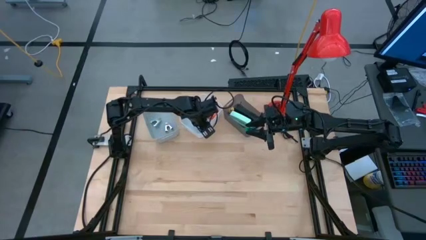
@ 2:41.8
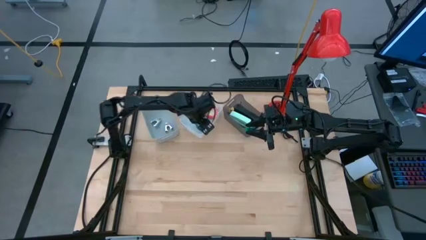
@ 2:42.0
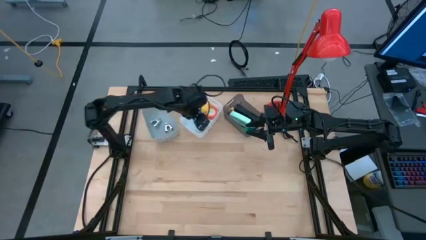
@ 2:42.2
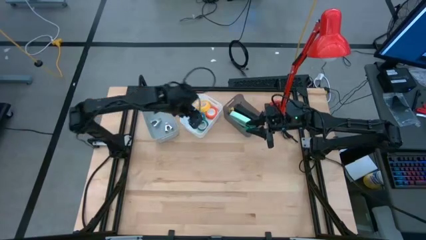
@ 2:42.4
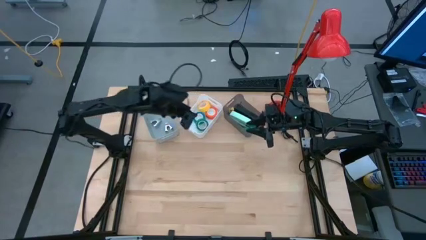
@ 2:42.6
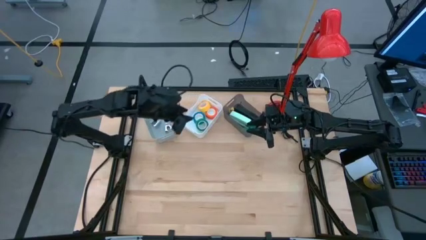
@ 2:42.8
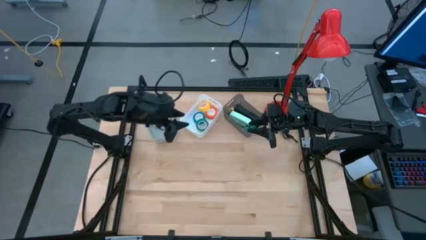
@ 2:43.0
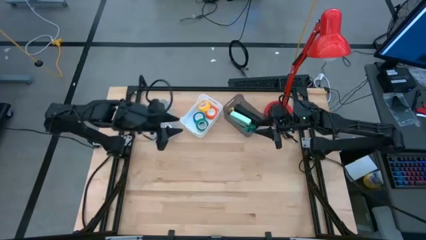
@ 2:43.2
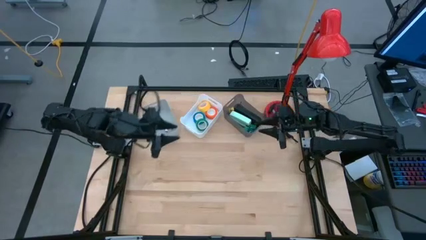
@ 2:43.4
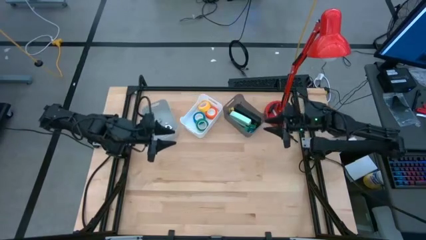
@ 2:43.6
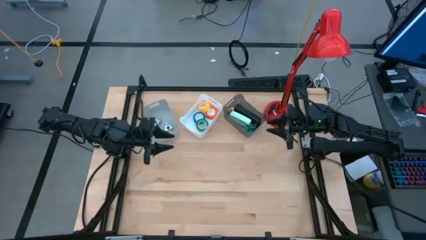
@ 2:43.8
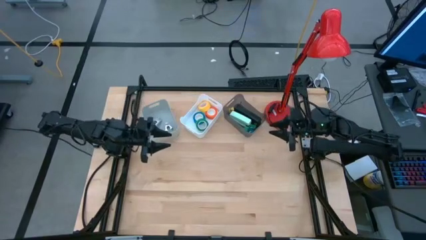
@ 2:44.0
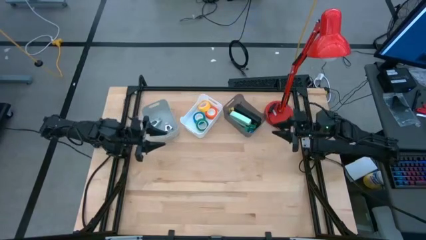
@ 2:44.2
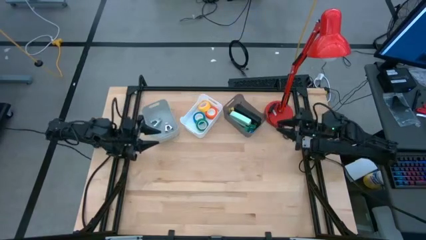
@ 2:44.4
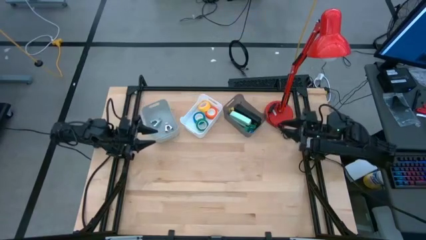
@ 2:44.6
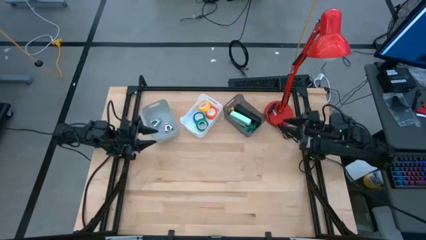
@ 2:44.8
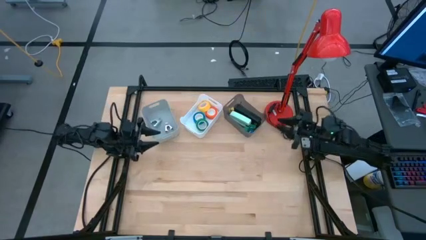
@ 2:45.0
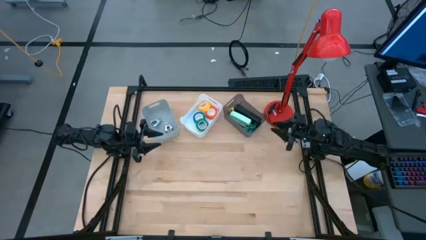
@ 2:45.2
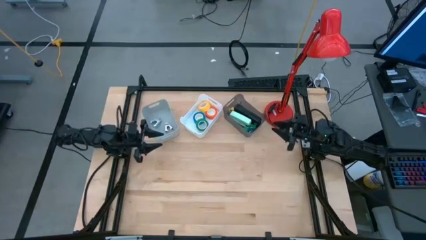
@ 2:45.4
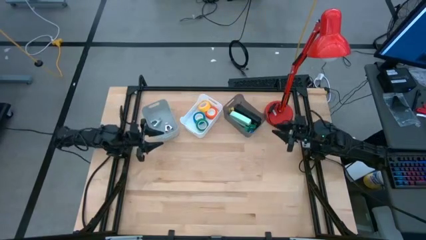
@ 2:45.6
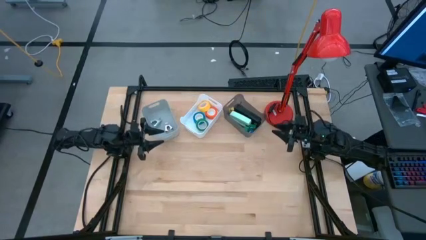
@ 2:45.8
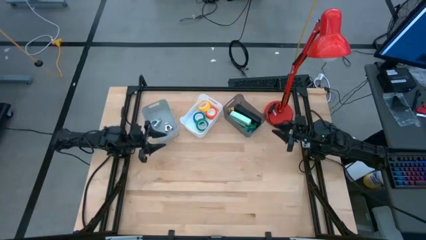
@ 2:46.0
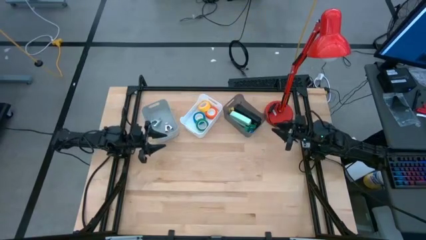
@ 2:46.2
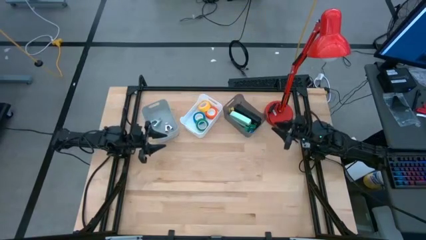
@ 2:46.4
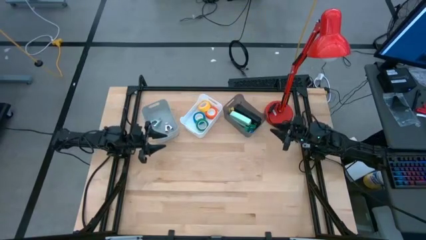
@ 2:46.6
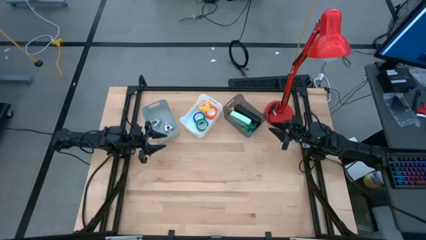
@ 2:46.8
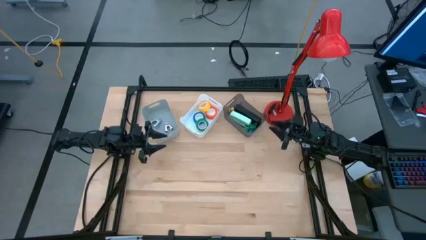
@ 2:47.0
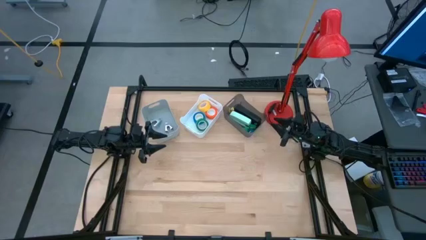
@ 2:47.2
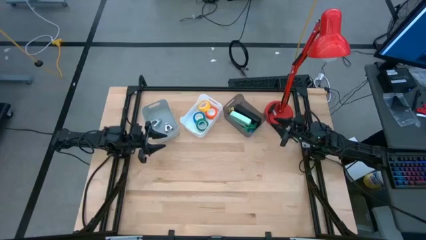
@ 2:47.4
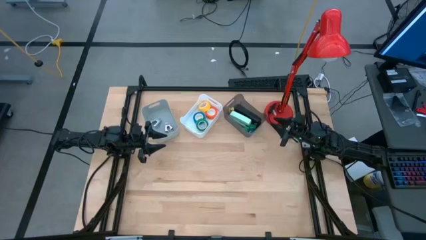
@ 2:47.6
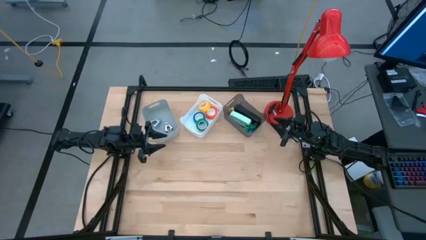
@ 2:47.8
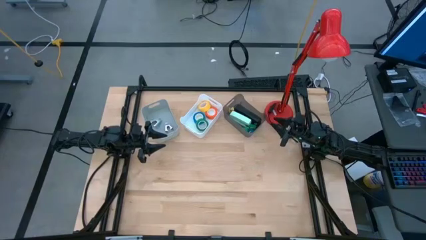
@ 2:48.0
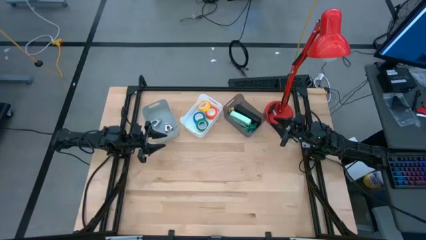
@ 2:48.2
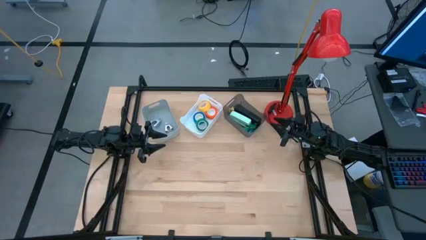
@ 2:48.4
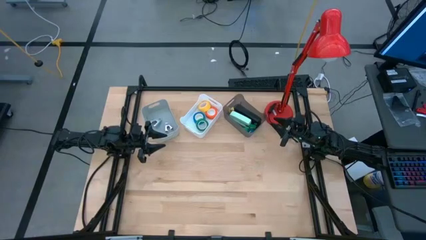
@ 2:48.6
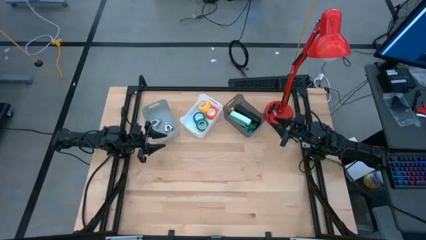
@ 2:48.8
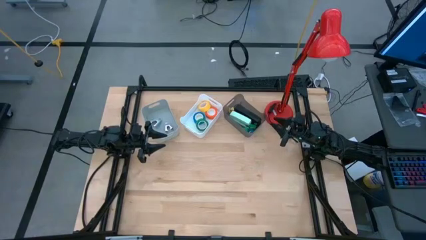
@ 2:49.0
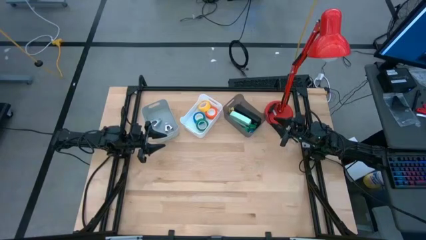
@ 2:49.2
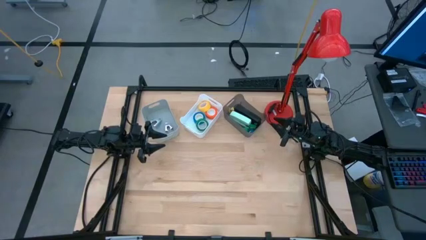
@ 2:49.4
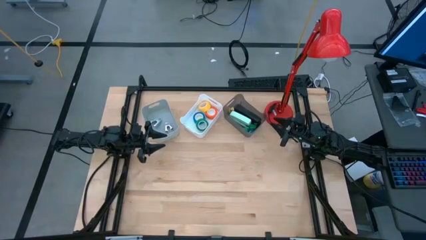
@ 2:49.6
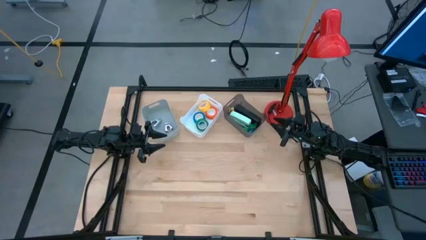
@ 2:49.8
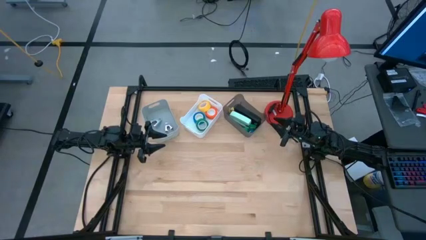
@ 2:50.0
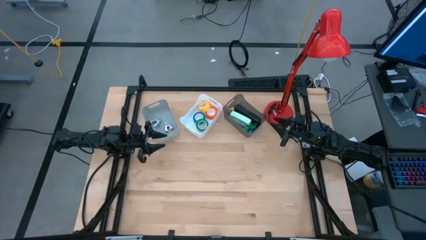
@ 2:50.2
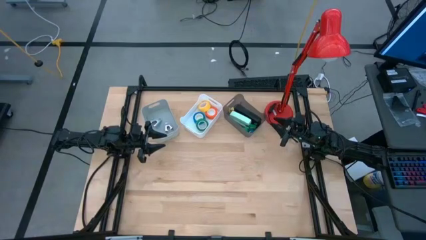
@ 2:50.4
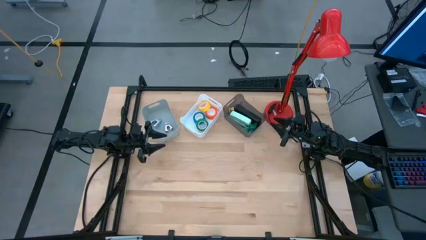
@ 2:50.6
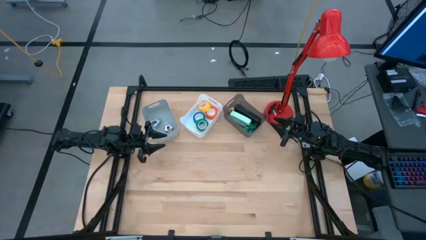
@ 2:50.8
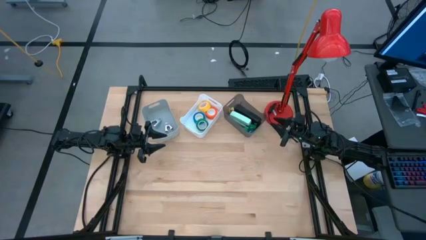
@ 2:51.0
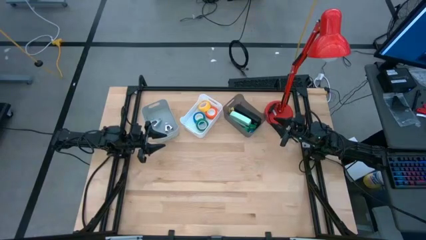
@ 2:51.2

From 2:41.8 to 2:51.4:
Task: Pick and place Stapler, Stapler remover, tape
Return to Home Position
